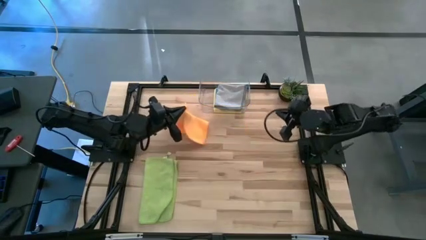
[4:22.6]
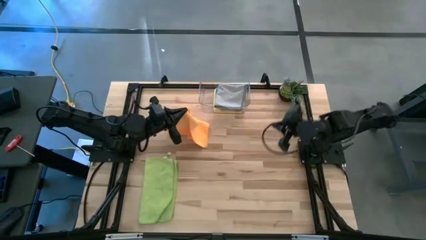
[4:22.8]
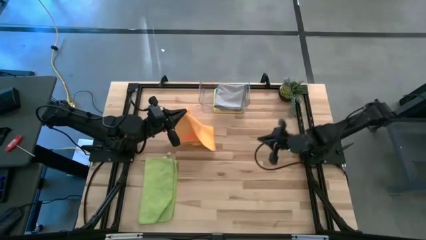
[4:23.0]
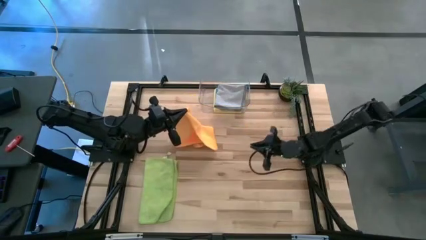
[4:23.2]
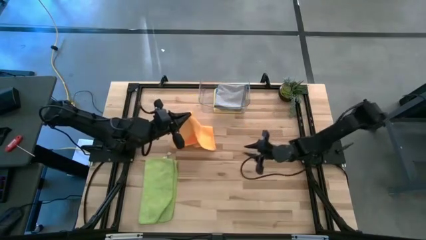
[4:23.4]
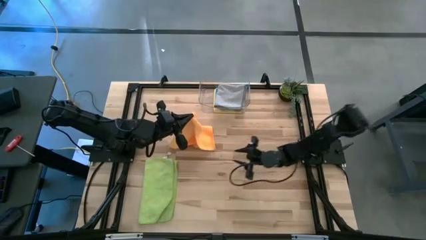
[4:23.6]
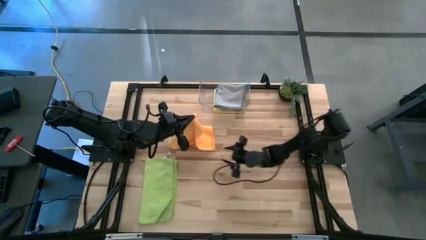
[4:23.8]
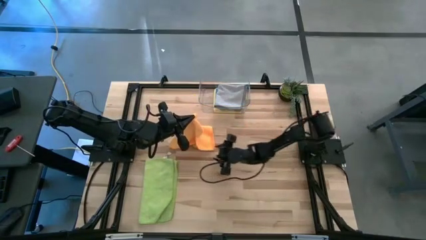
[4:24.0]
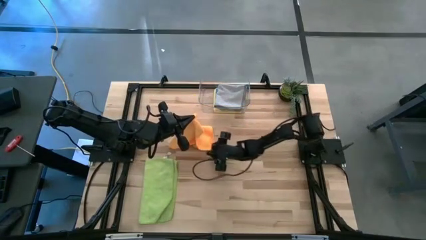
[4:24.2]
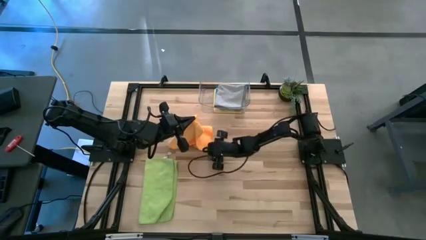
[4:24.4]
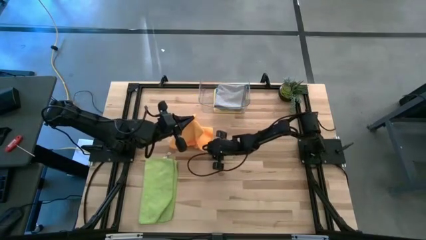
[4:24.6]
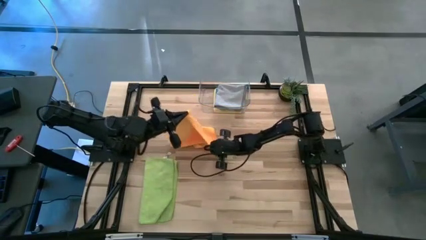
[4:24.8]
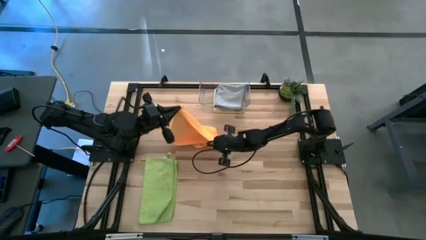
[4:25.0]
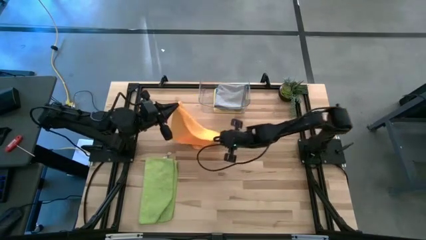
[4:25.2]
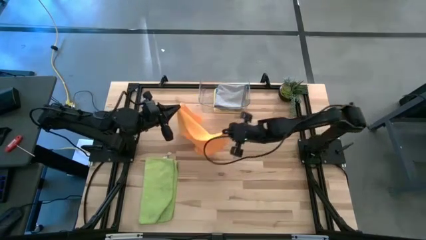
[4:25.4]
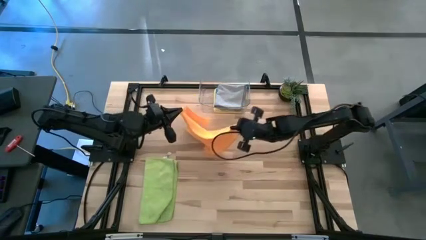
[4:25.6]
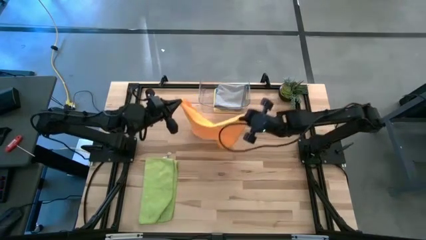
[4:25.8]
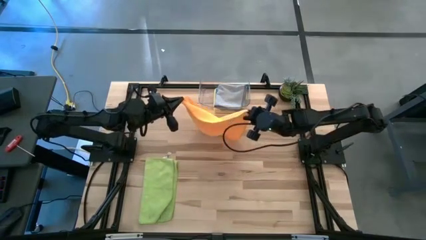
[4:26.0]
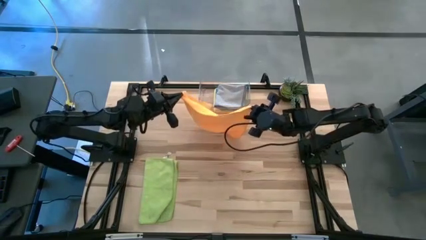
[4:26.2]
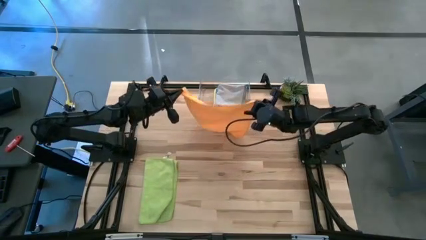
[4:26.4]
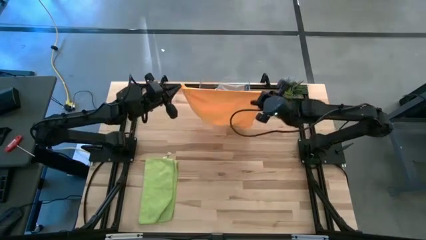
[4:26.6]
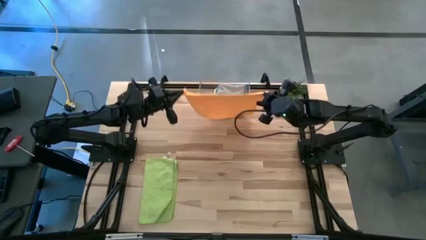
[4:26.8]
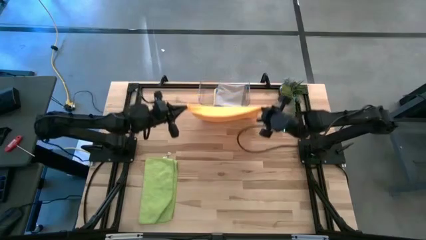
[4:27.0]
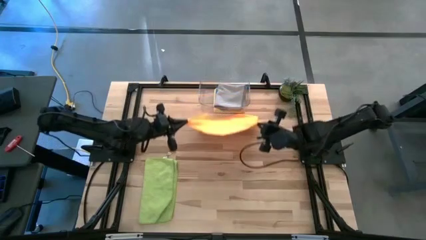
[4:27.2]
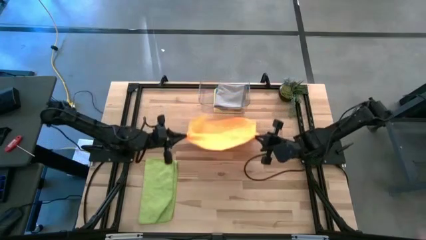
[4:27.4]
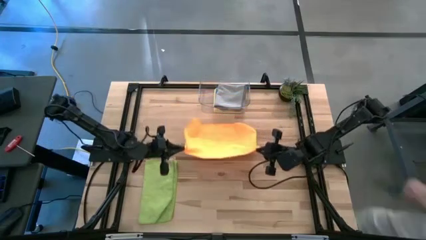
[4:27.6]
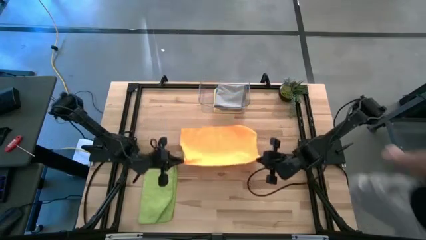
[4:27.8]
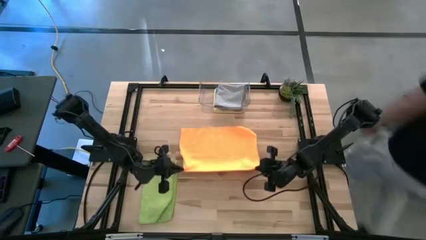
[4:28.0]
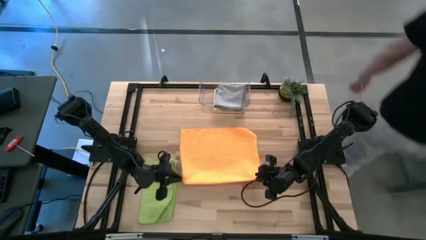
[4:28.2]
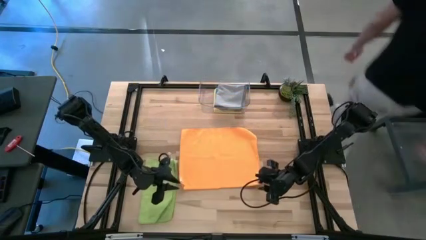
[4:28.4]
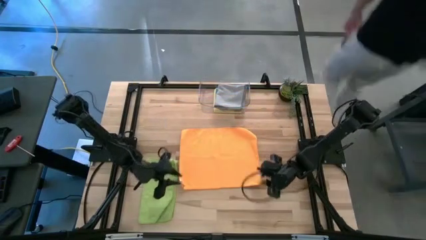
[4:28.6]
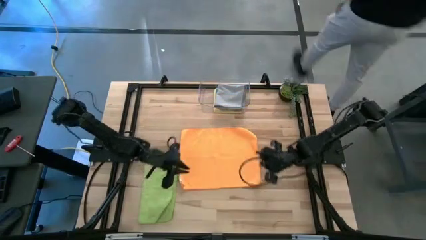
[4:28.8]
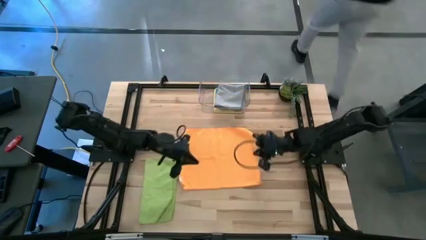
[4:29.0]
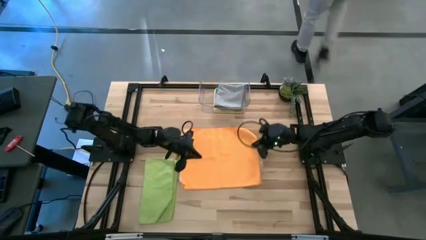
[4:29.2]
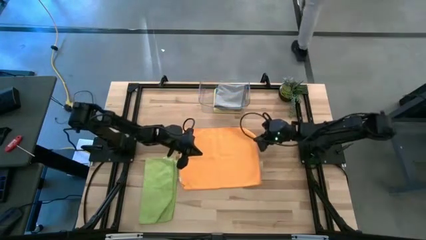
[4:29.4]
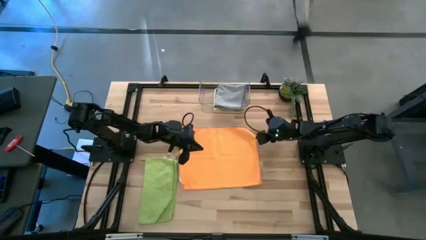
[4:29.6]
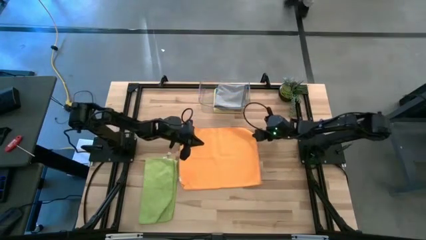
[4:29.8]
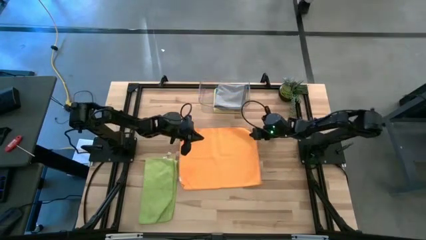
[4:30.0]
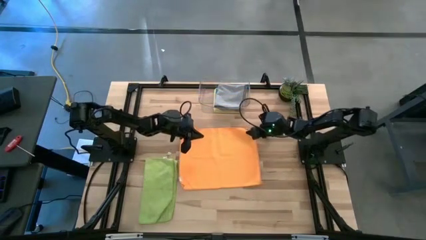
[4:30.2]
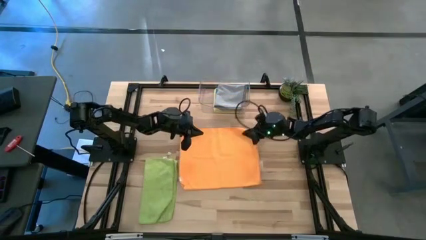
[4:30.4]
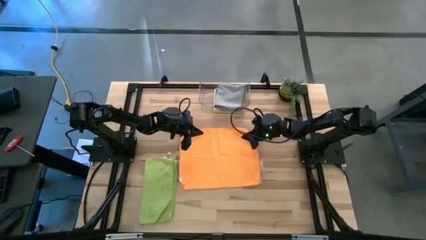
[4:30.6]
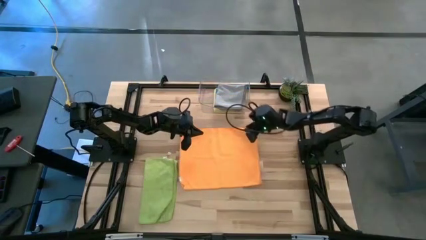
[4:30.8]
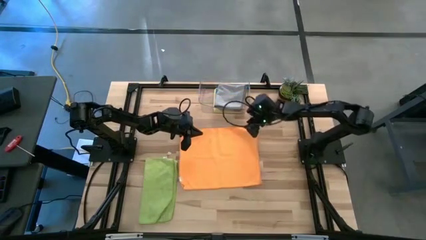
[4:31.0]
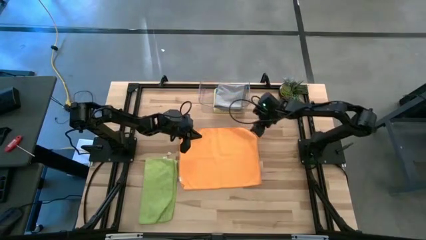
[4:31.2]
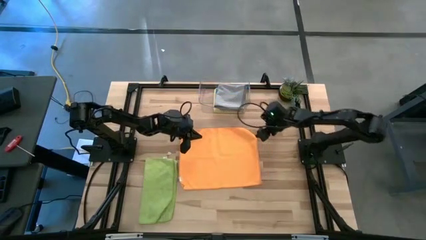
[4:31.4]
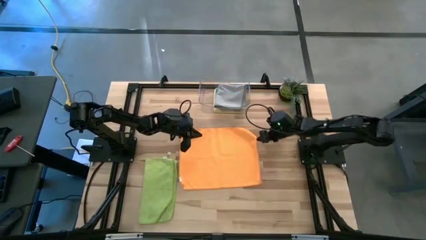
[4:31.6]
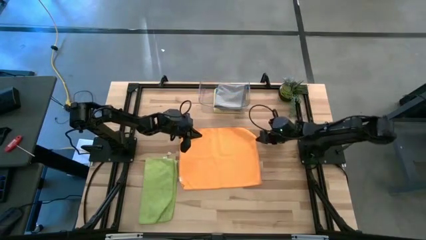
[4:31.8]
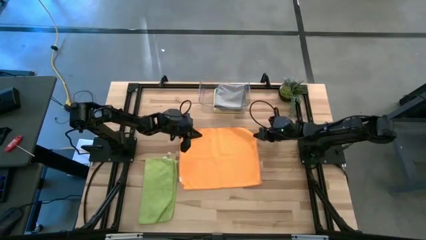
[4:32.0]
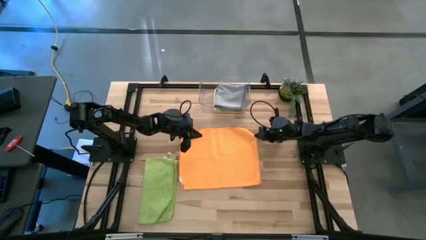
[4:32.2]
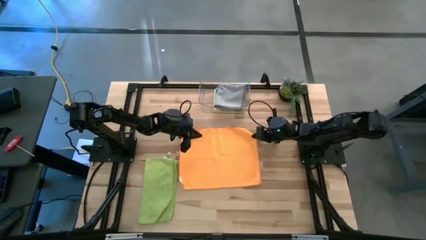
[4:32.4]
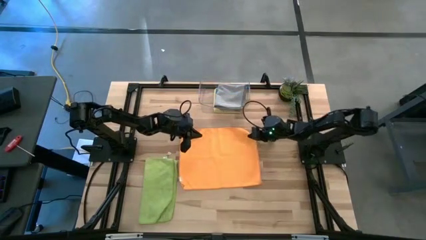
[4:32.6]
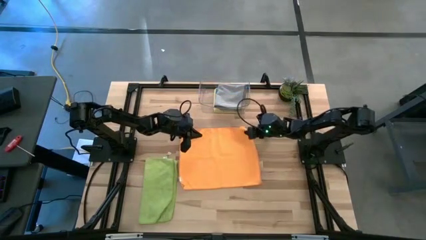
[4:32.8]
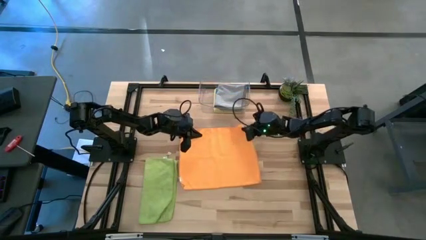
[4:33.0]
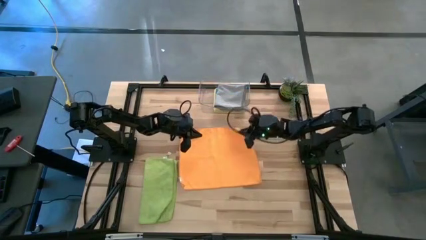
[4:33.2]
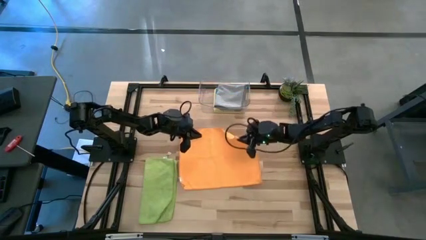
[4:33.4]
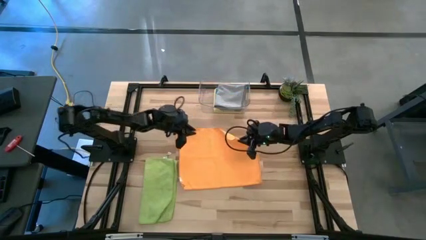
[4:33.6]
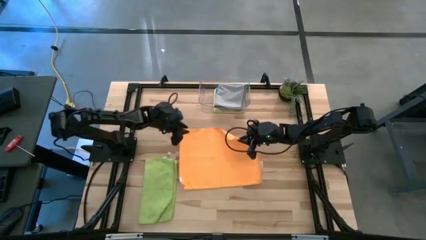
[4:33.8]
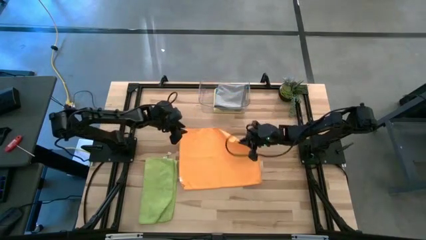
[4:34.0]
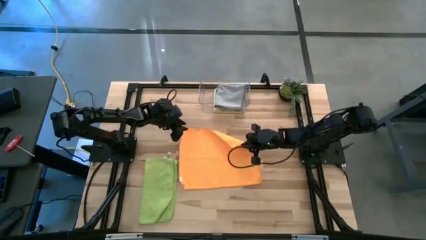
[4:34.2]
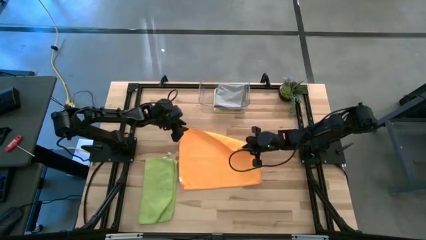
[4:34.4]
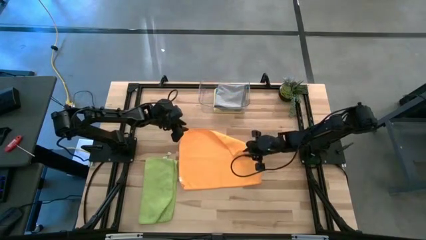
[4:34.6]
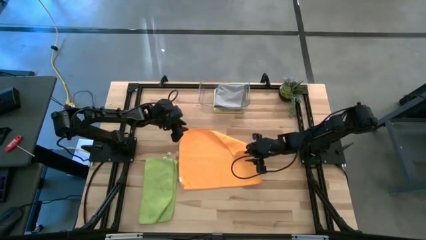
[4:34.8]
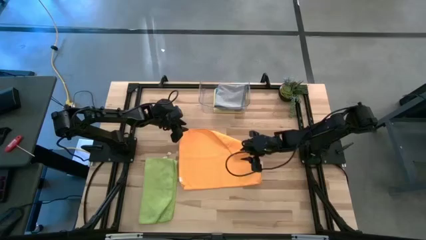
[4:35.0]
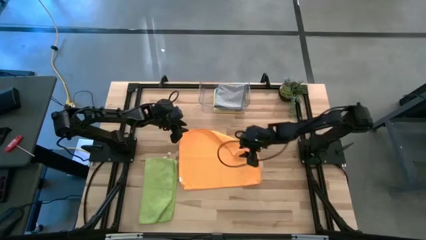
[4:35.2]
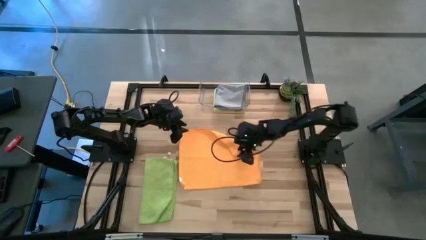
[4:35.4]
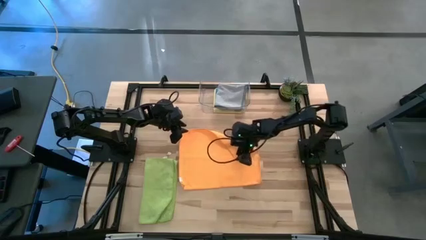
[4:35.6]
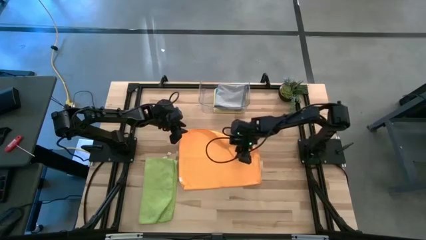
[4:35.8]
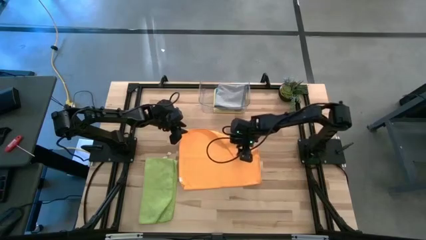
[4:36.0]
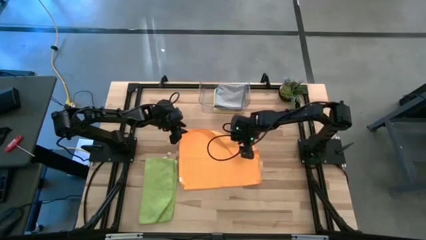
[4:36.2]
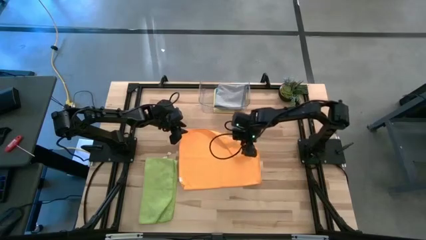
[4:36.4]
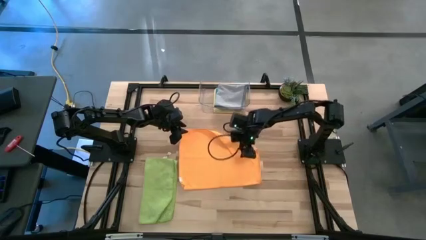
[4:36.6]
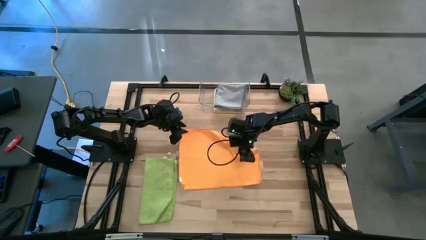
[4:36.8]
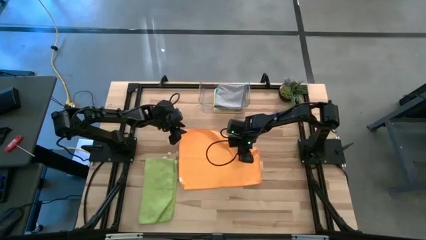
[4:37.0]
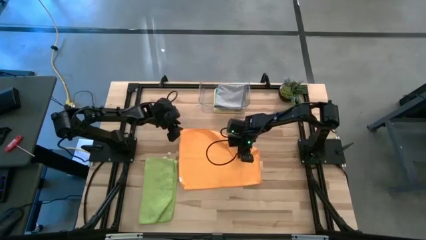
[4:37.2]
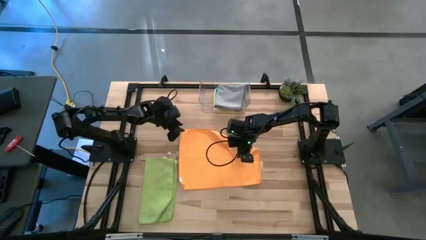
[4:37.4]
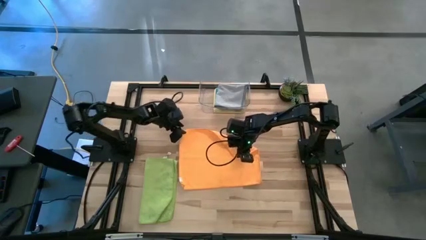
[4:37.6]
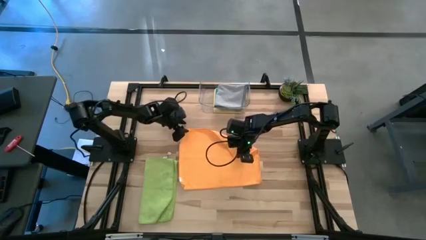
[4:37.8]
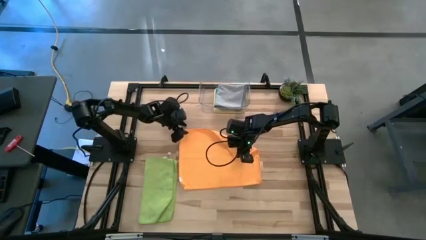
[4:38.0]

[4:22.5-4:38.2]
Task: Fold microfiber towels
Fold the orange towel on the table
